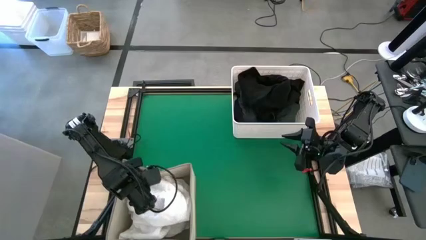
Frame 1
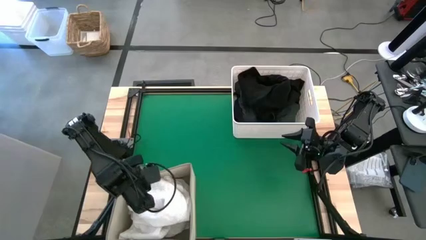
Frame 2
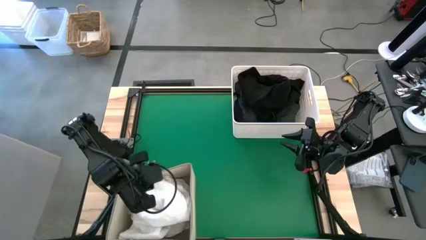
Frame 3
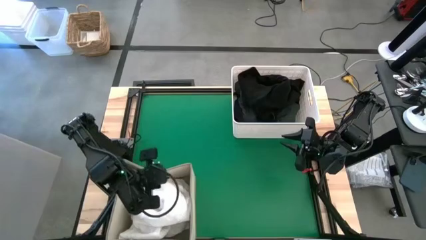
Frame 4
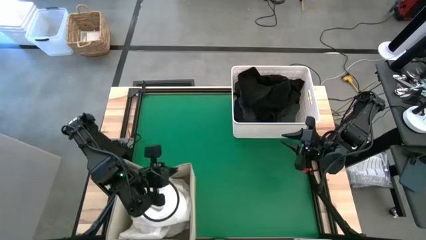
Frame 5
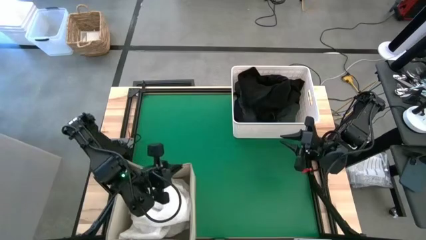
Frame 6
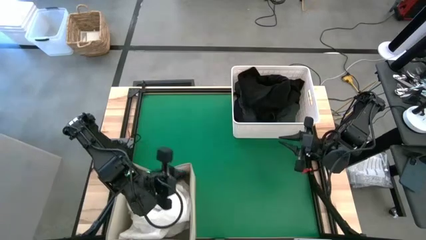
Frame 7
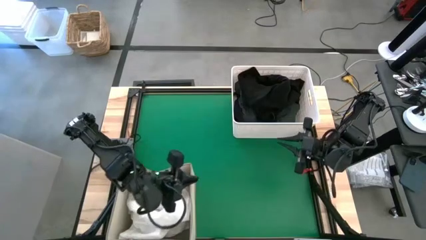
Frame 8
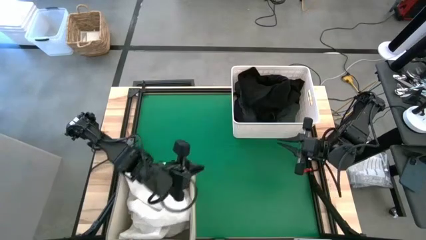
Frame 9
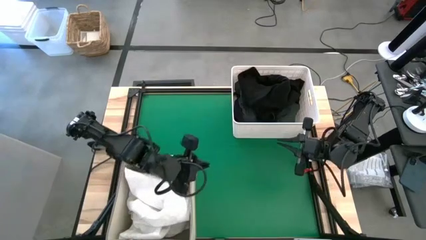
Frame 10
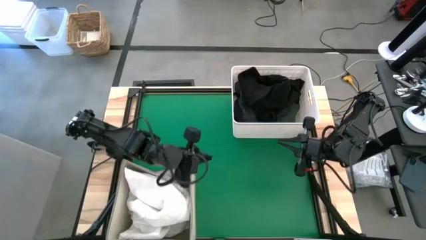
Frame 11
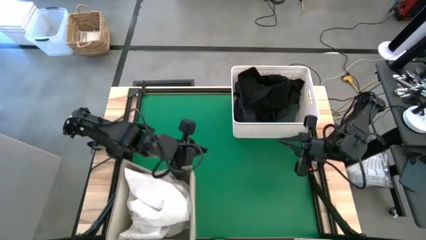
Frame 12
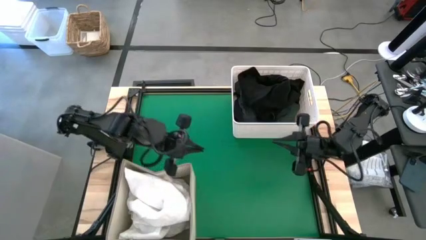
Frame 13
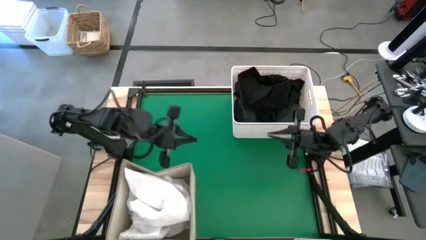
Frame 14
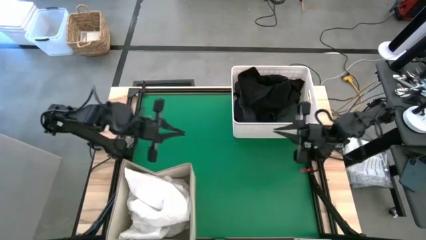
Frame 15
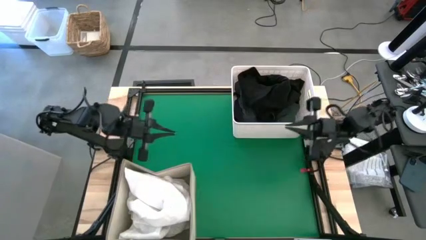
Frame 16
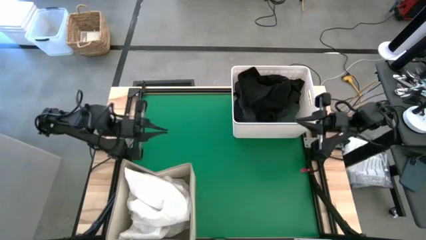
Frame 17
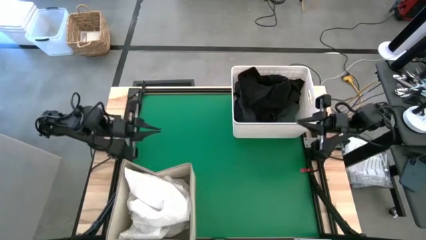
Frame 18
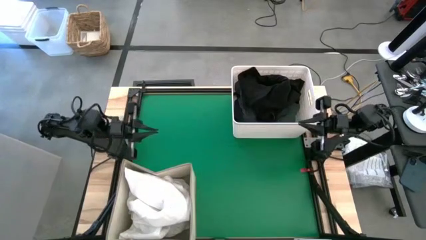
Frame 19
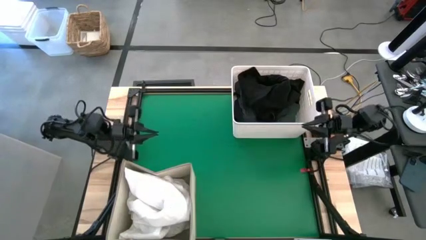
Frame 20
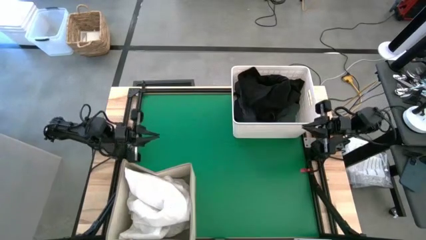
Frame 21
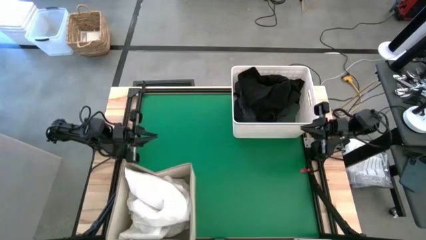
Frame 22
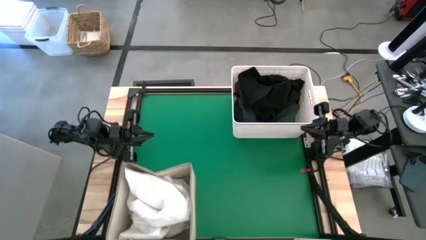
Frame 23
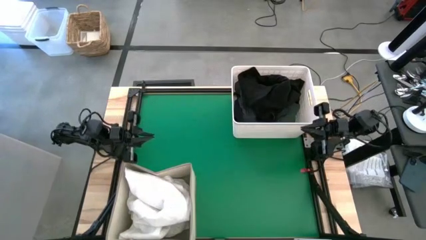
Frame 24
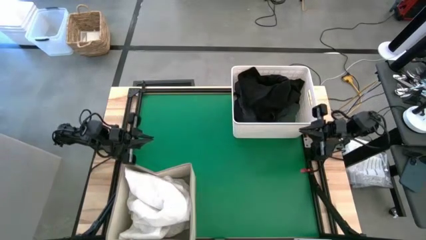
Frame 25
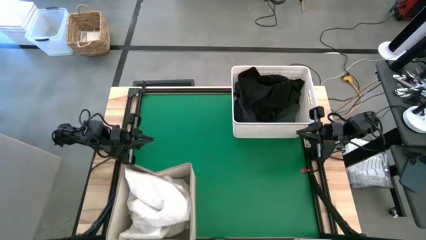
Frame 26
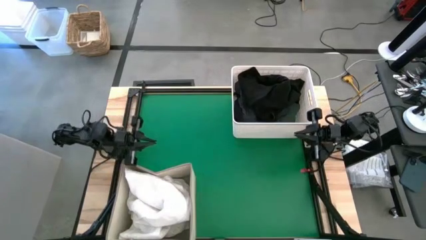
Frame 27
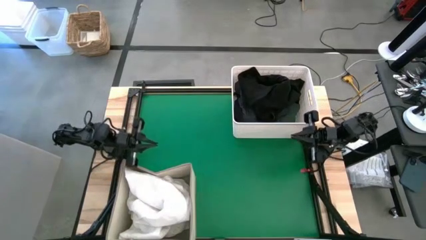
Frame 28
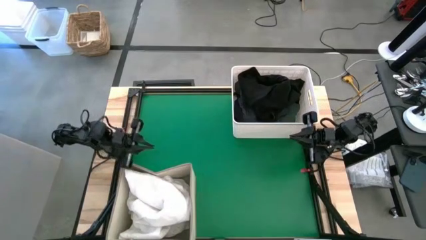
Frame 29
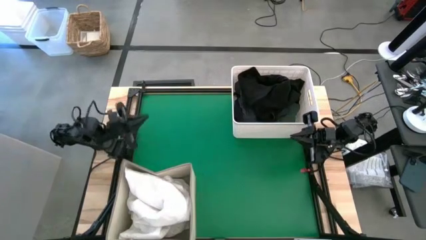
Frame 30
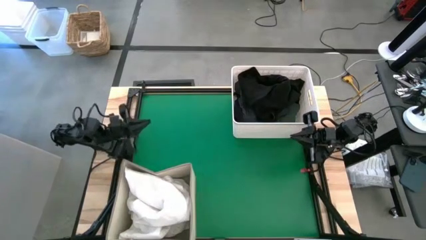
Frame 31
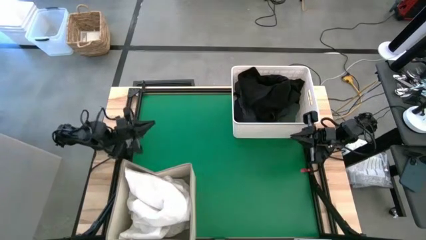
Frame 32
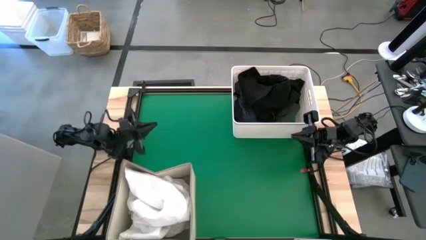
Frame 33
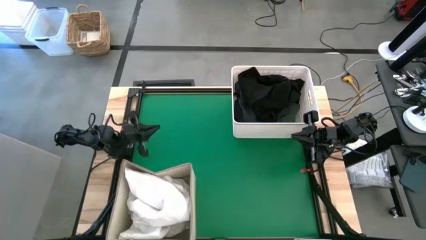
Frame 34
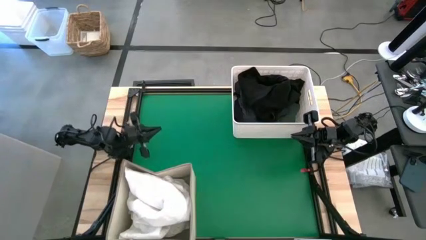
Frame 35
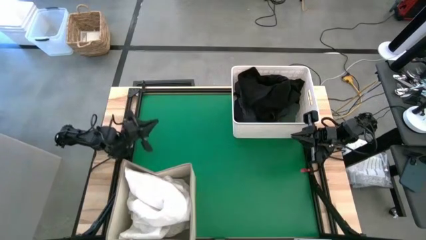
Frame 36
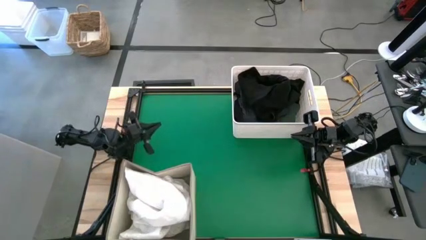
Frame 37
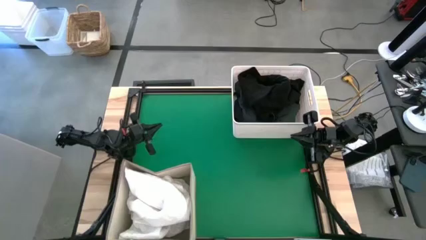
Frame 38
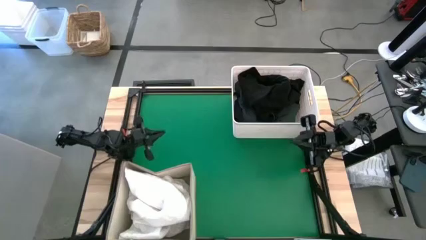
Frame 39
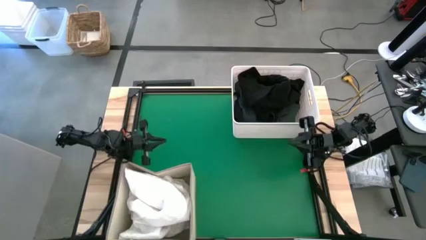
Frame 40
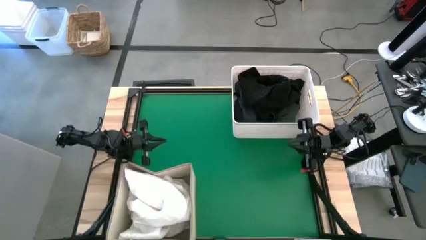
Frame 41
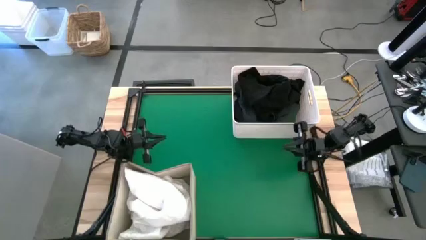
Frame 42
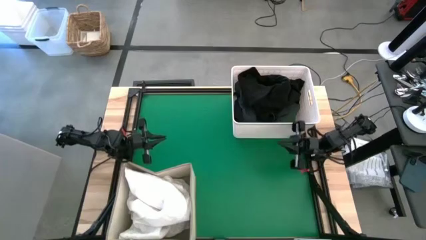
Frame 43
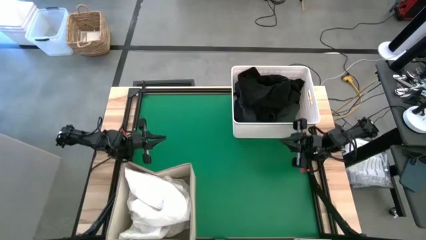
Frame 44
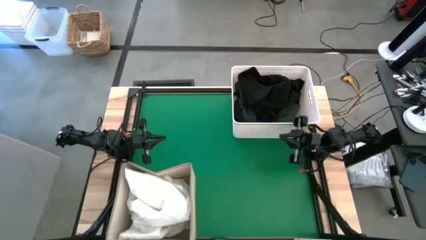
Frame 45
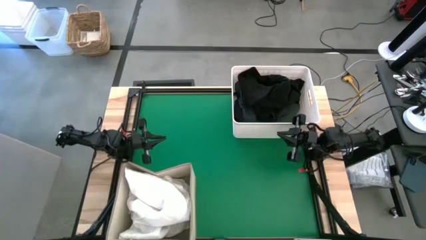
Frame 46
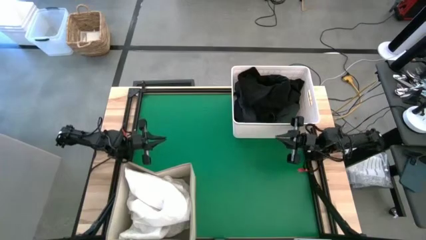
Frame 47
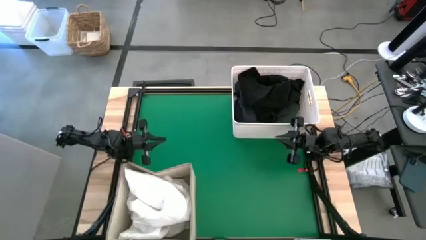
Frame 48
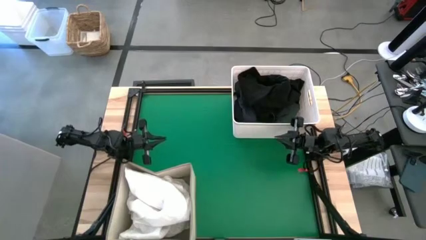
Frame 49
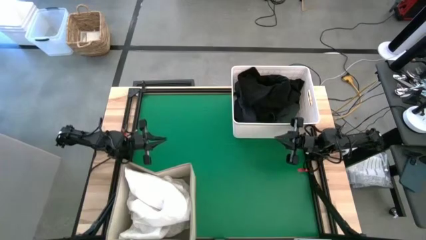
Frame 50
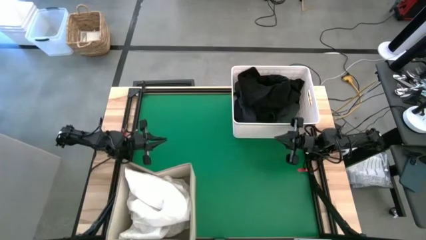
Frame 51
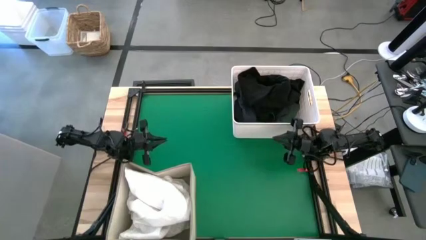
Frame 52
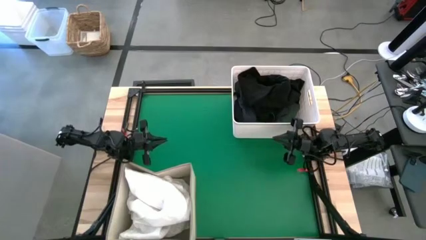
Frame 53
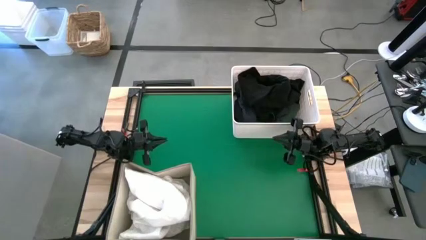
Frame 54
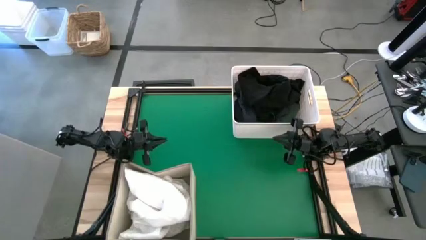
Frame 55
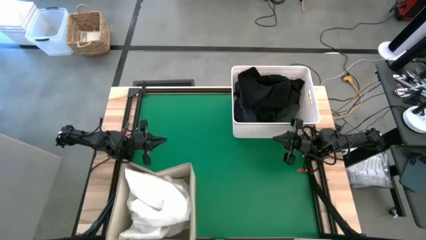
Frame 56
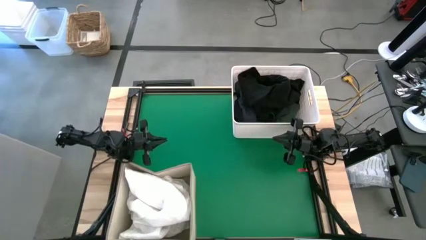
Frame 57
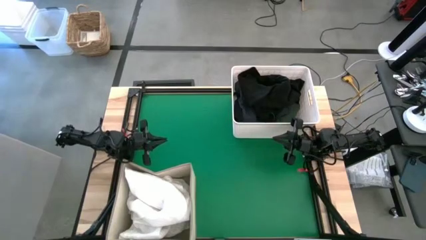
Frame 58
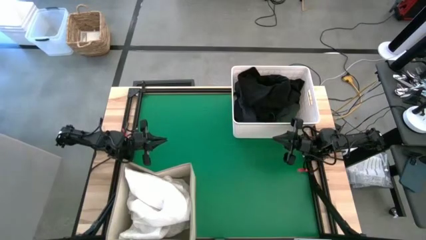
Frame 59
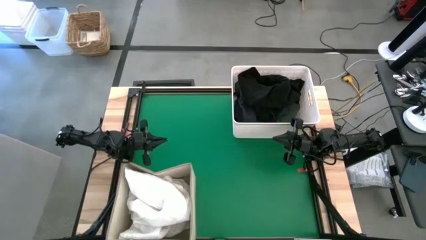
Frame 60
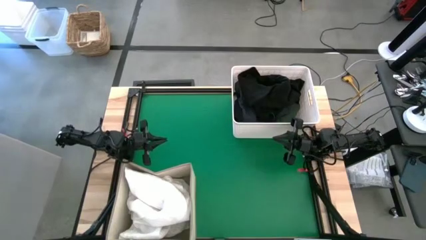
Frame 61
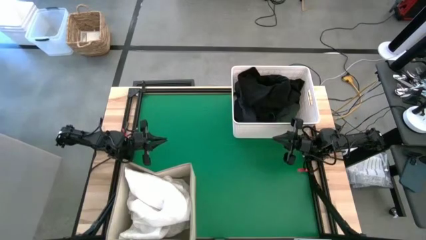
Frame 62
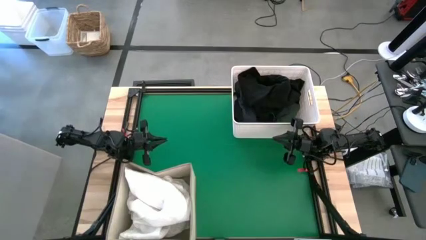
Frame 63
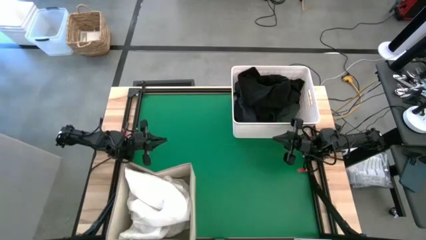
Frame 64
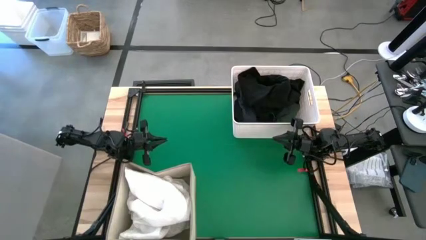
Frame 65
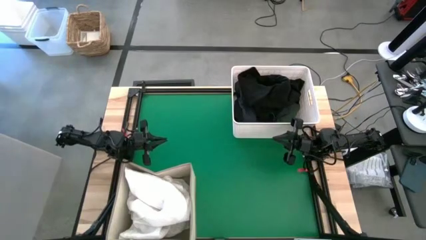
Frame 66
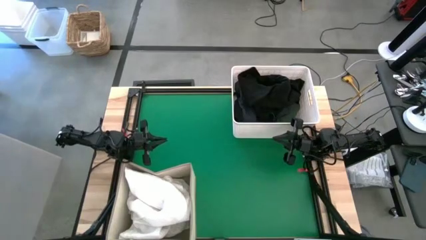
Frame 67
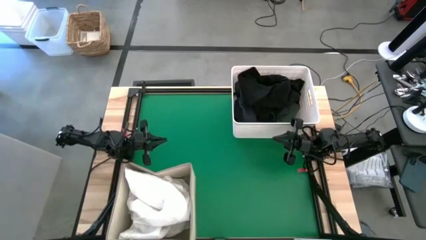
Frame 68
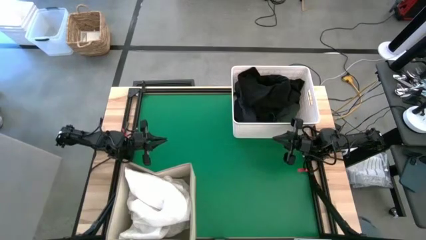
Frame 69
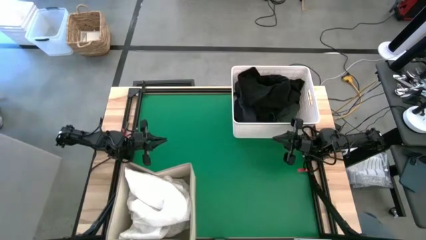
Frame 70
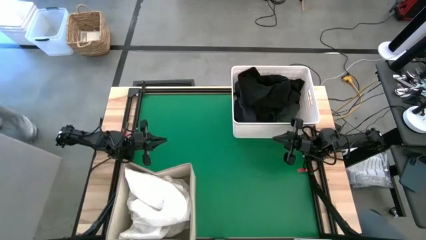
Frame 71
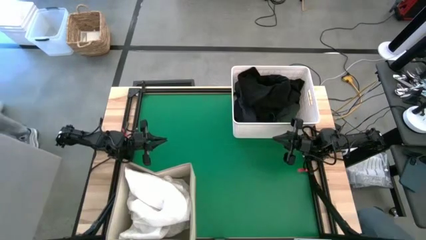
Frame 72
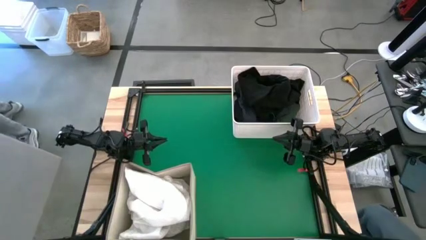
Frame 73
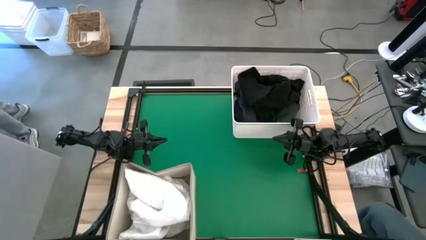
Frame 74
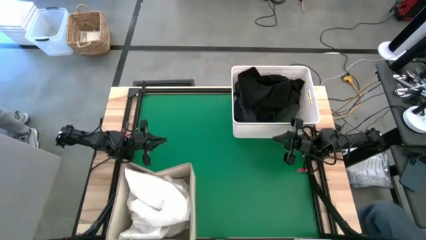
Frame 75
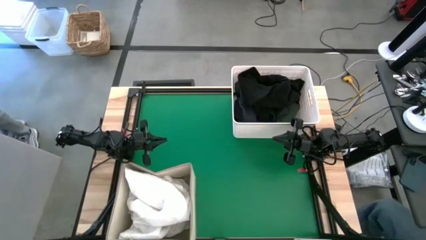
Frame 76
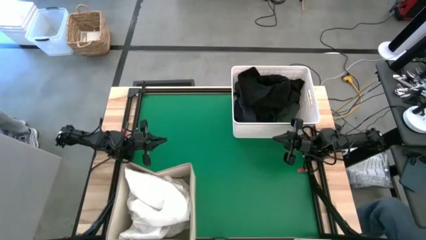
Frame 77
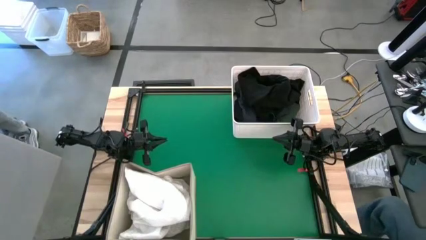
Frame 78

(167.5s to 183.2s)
Task: Sort clothes
Return to Home Position
